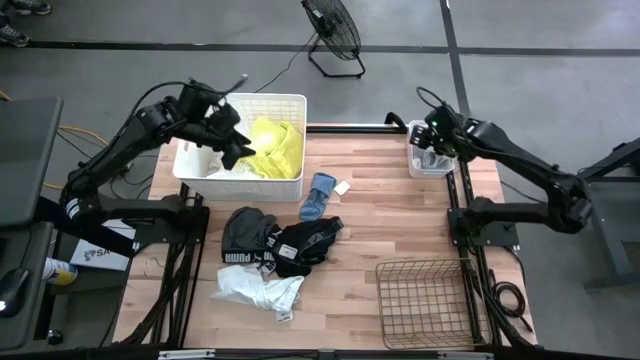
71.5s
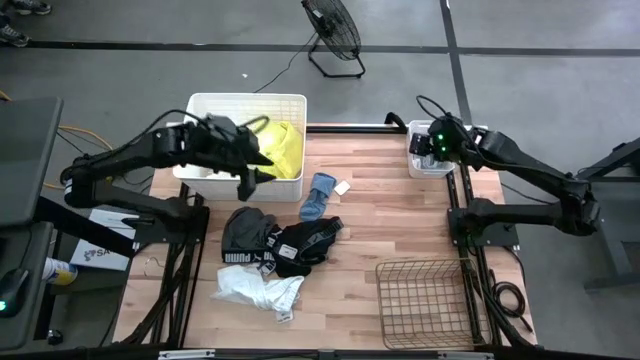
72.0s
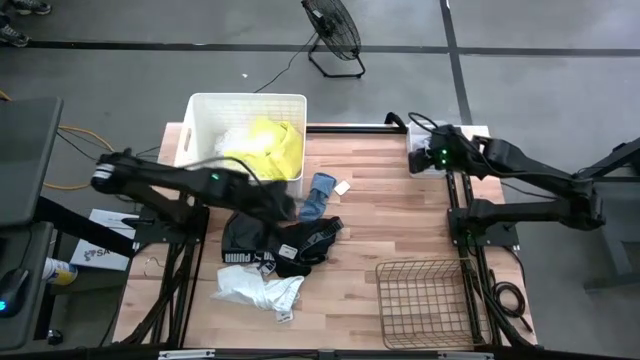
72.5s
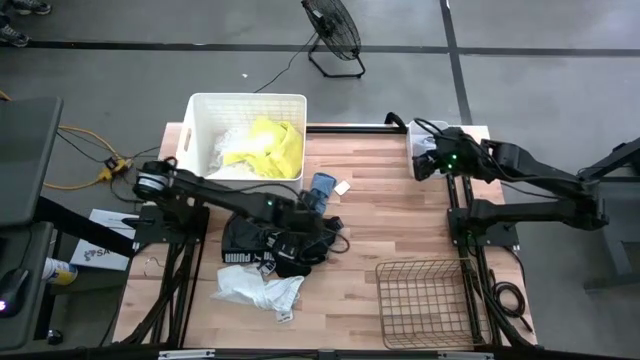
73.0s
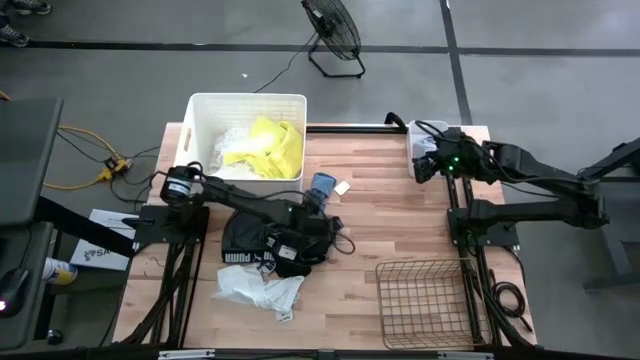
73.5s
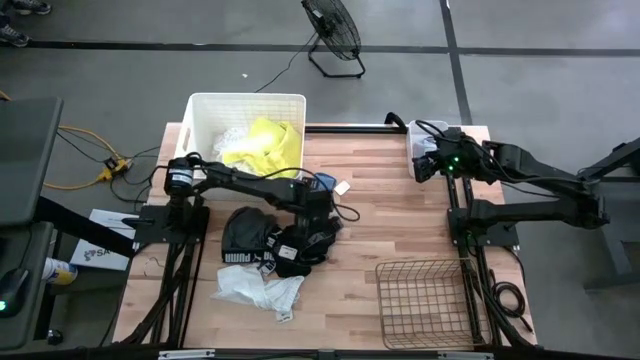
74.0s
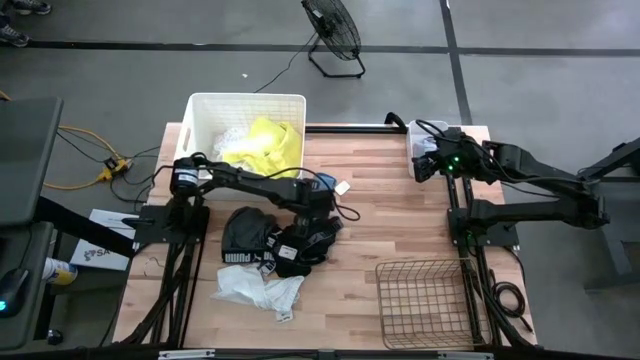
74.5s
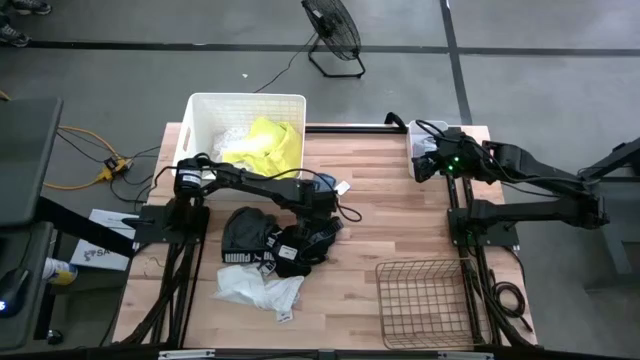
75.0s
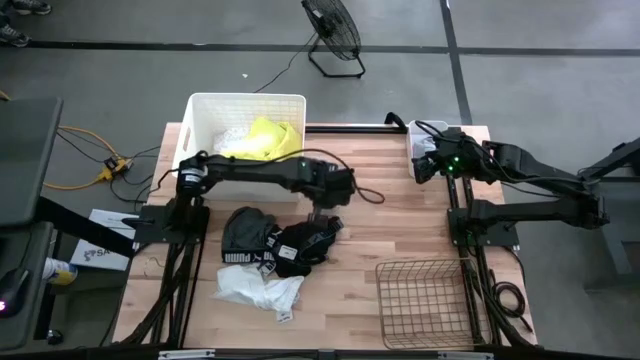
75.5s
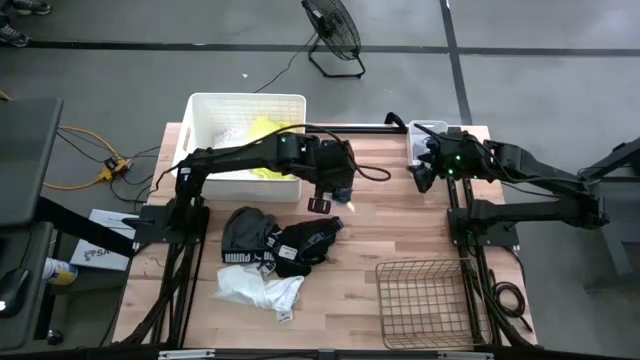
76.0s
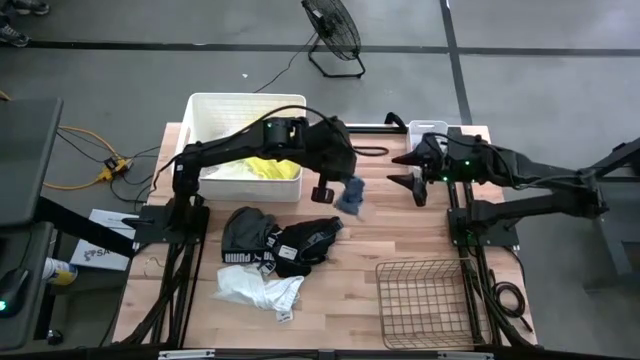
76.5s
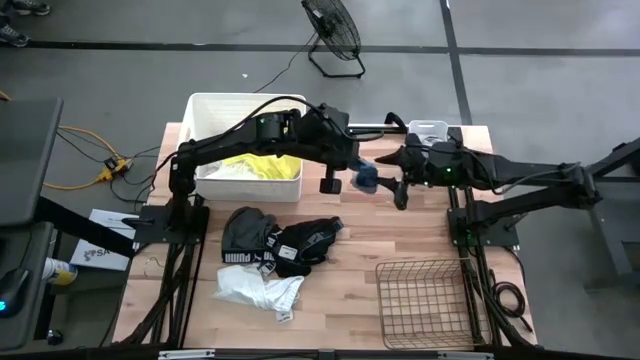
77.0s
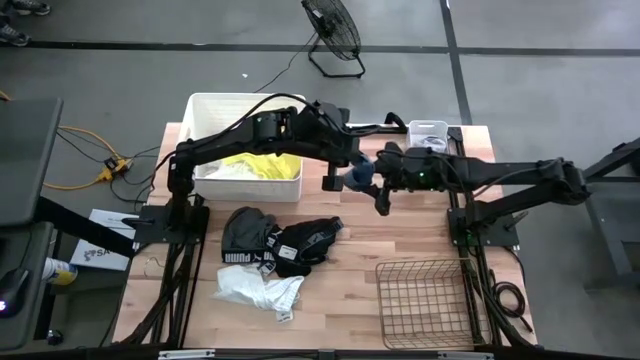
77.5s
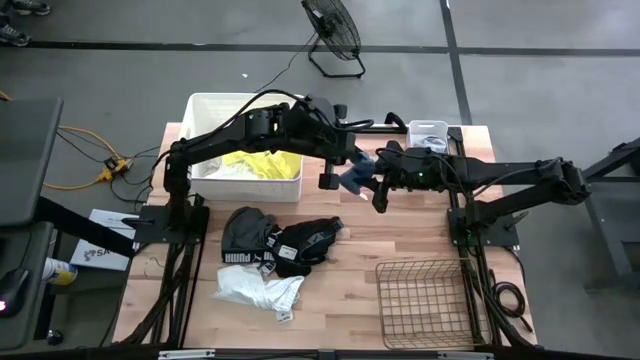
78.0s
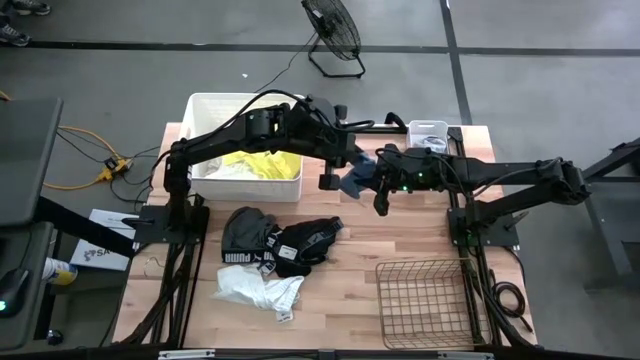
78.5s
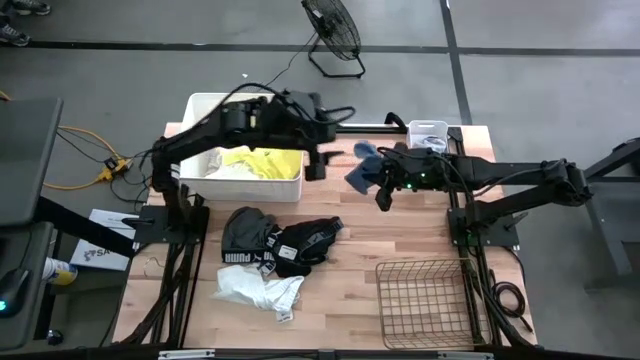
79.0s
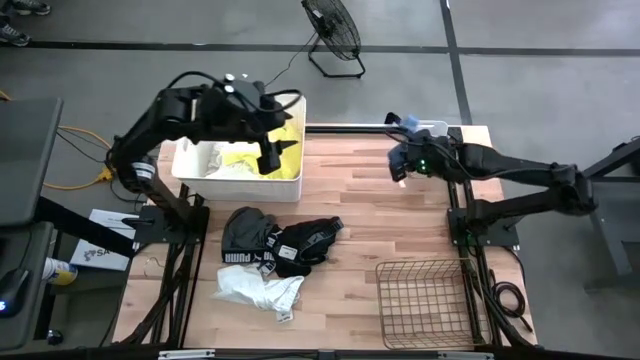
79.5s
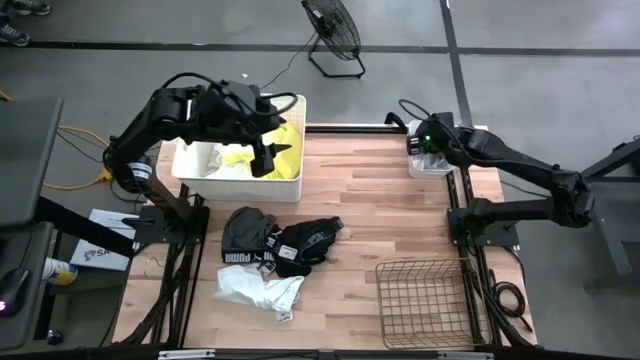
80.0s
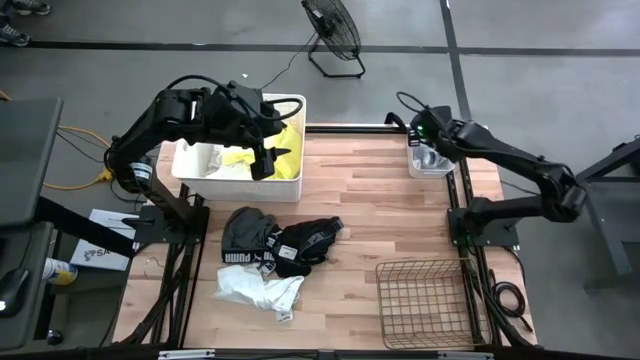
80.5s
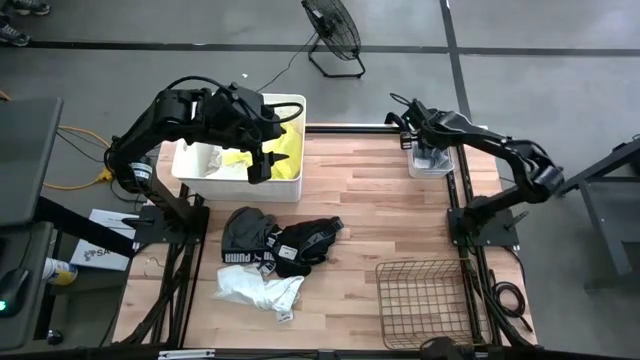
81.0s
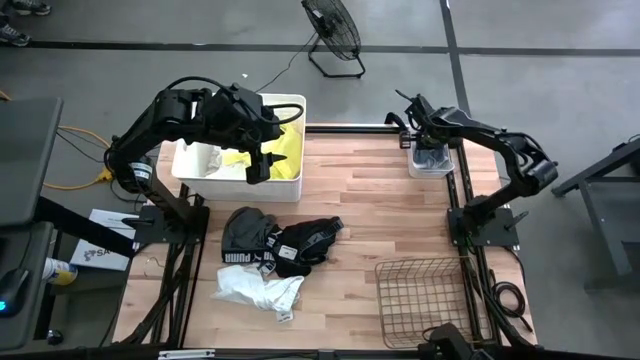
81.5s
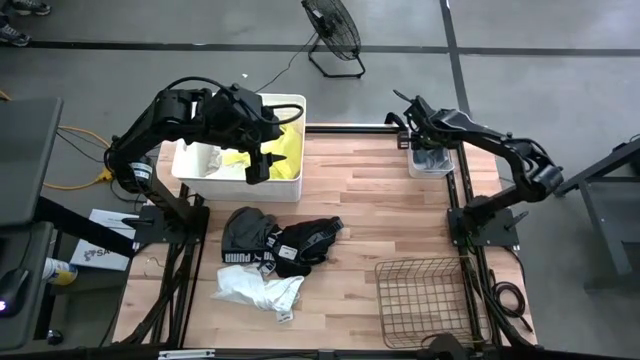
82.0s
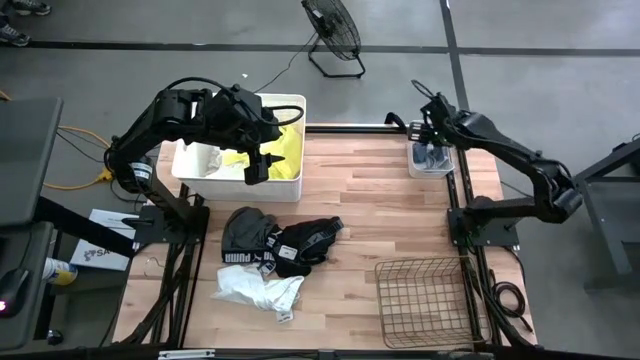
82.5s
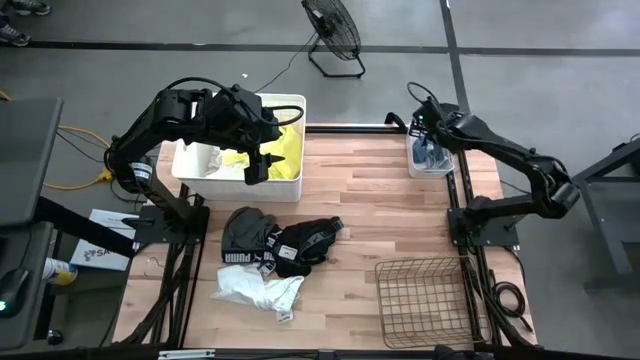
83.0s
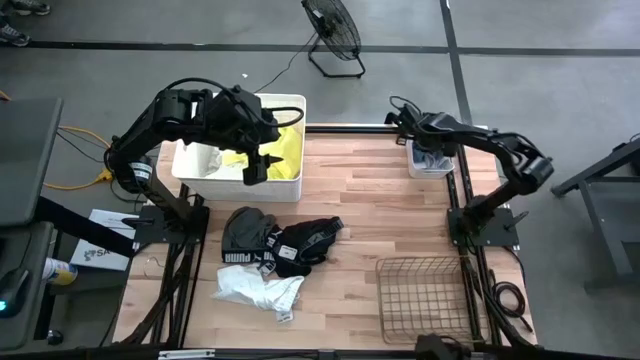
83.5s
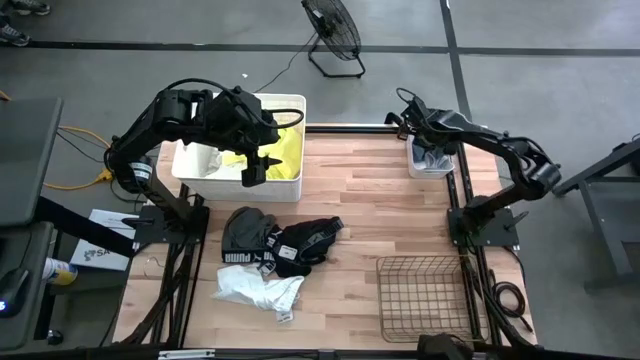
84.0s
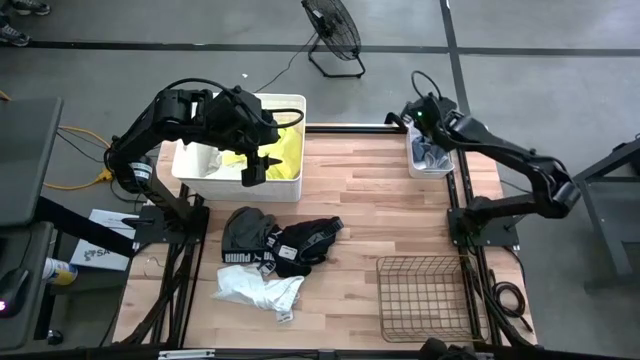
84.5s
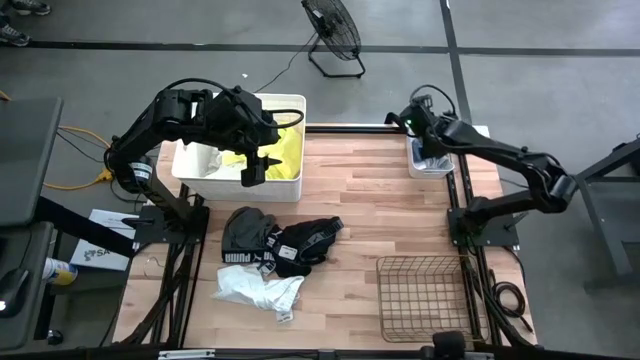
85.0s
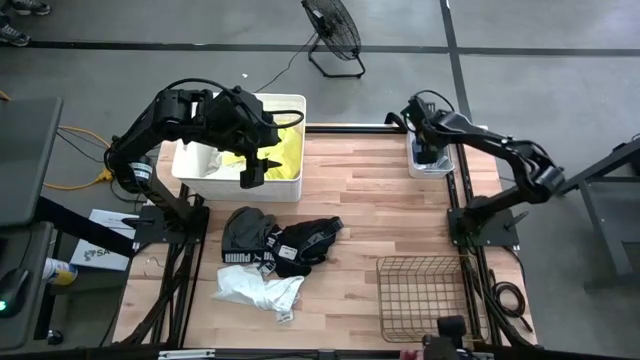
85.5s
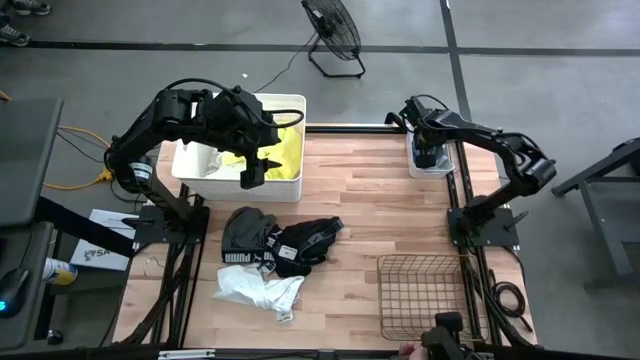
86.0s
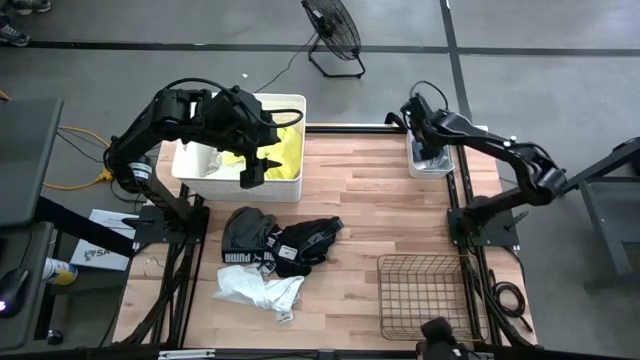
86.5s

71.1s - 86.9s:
Task: Pick & Place Cloths
Put the blue sock into the small white bin

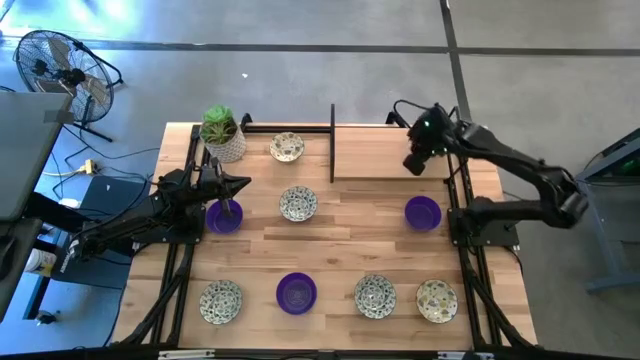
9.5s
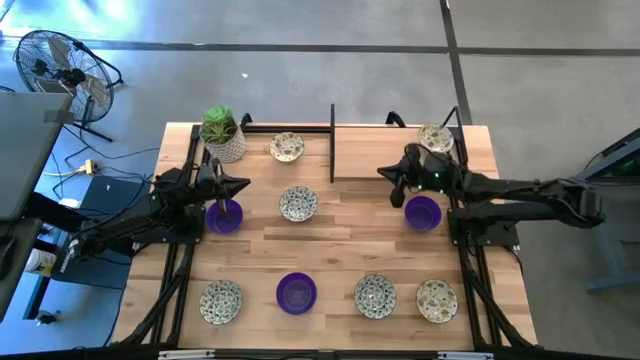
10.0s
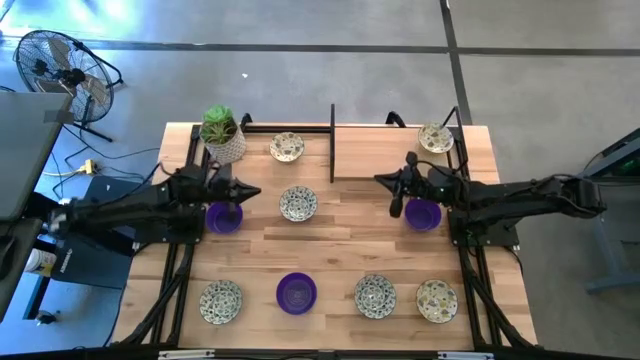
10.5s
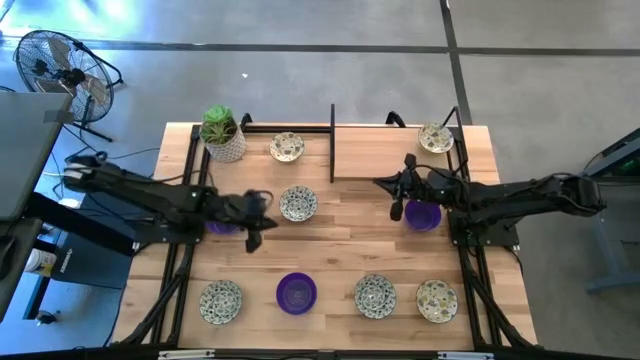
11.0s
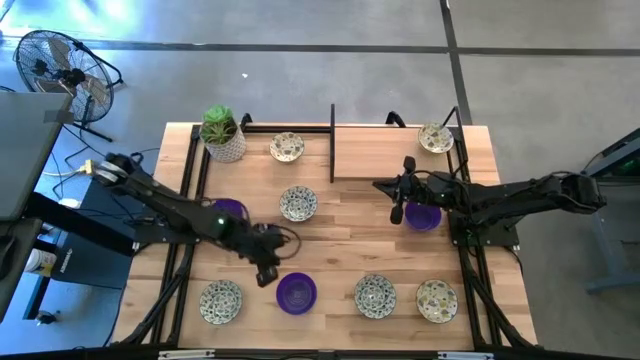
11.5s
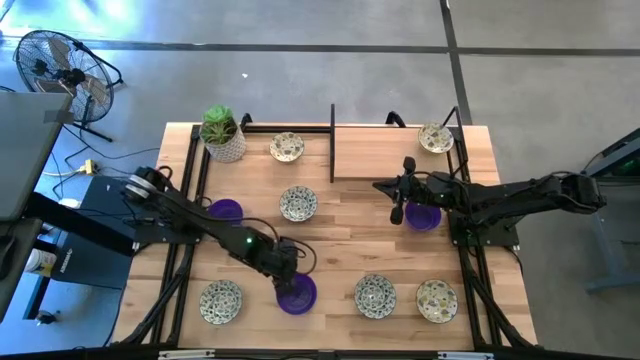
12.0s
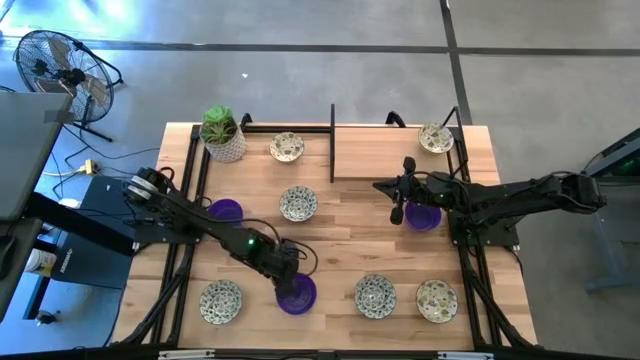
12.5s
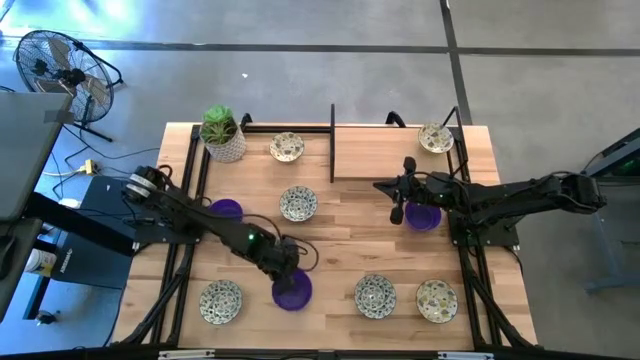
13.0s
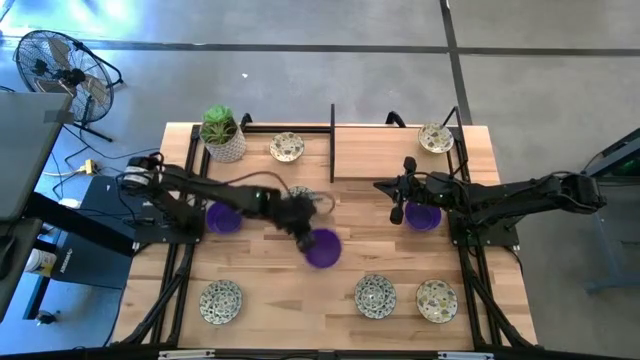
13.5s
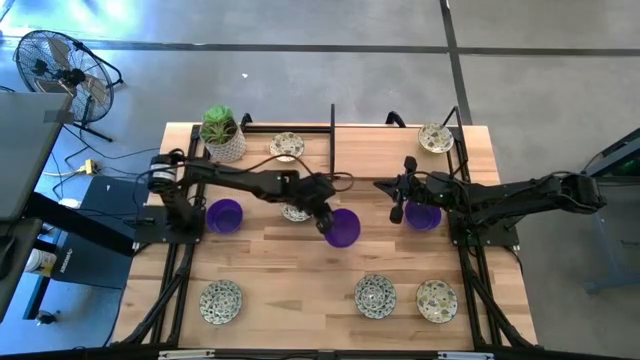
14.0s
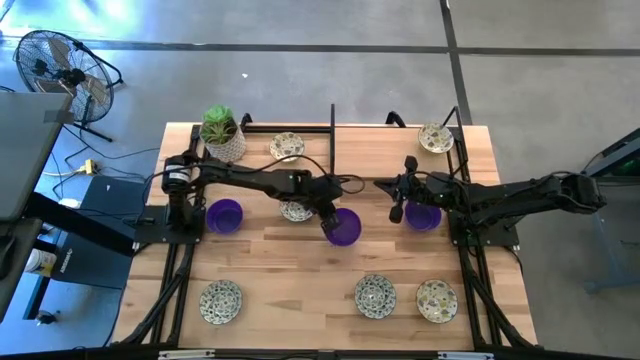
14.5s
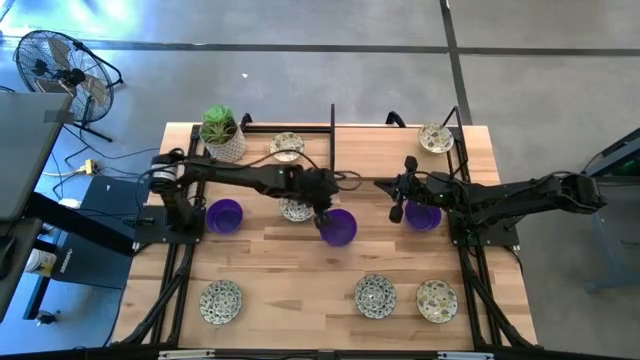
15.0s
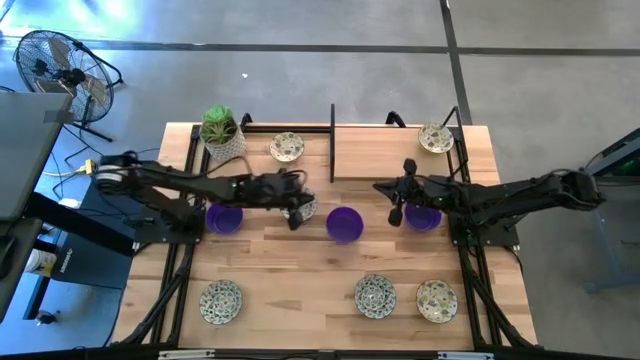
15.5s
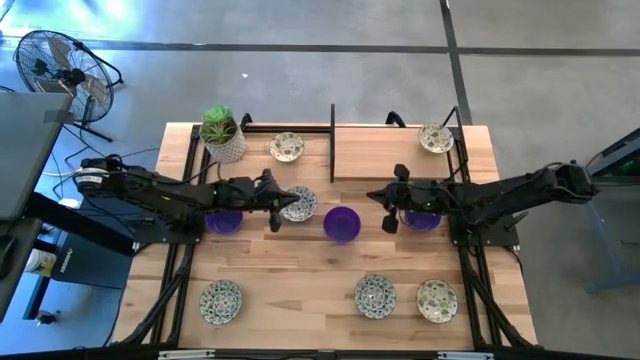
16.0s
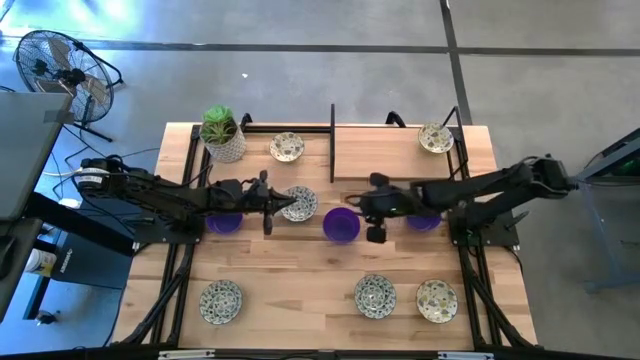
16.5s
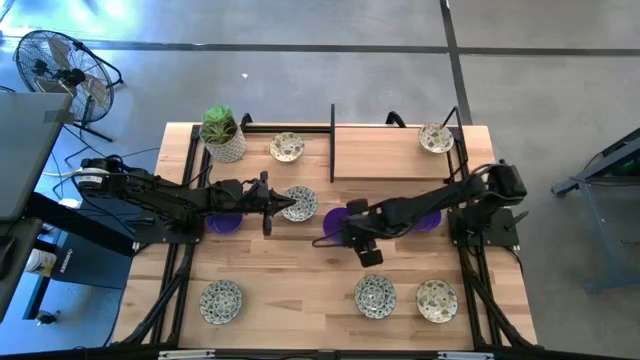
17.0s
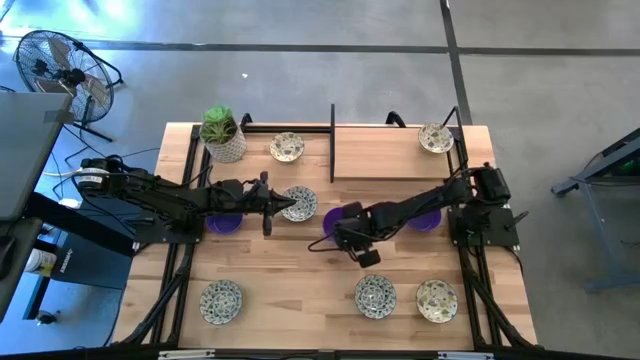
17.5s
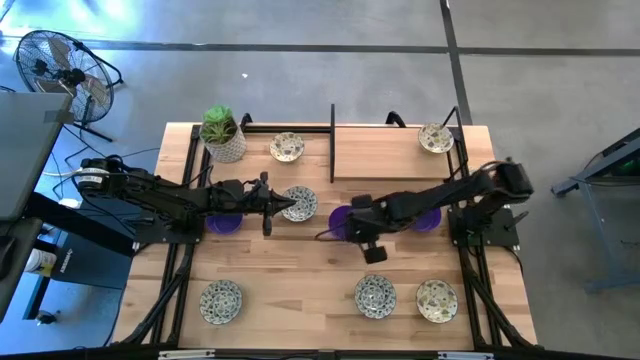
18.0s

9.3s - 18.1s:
Task: Pick & Place Mini bowls
Put the bottom blue bowl on top of the shelf
